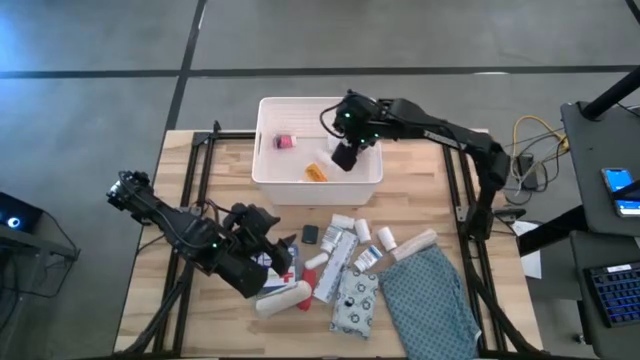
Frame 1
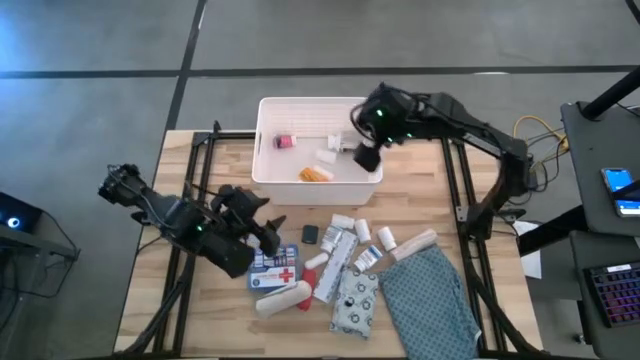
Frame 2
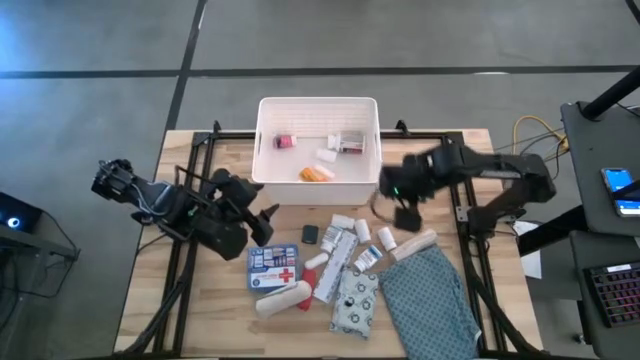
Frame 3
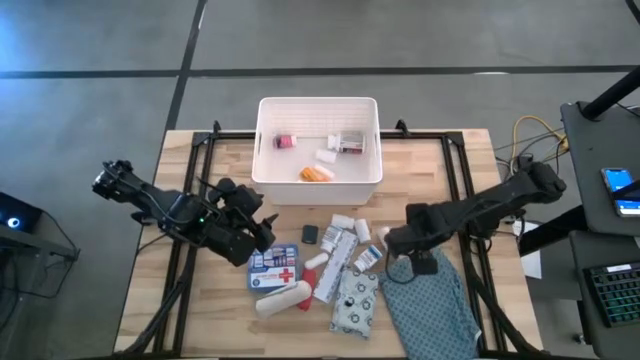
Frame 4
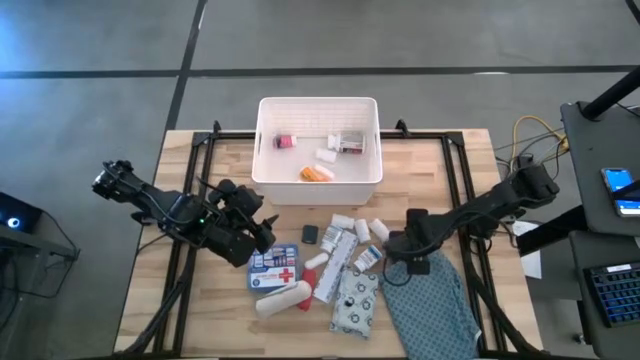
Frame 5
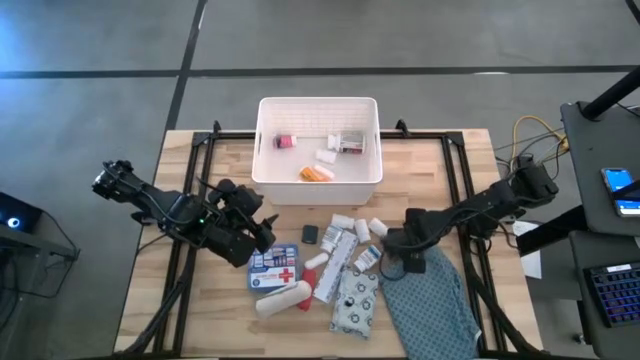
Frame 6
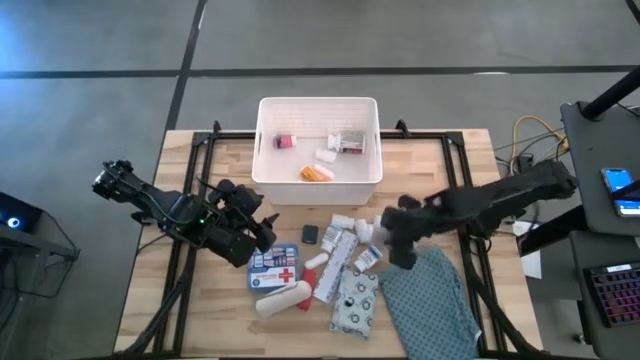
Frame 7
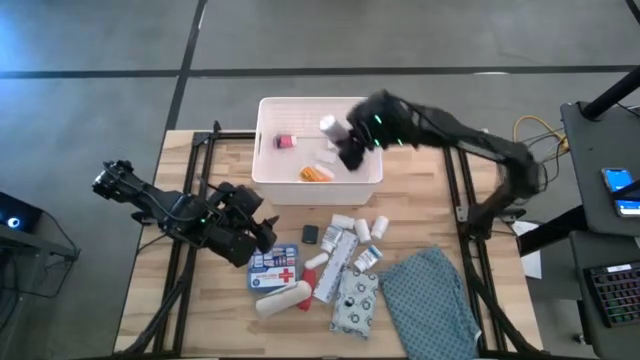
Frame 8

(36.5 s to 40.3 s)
Task: Pick & place medical supplies in basket/bin
Put the white bandage into the white bin

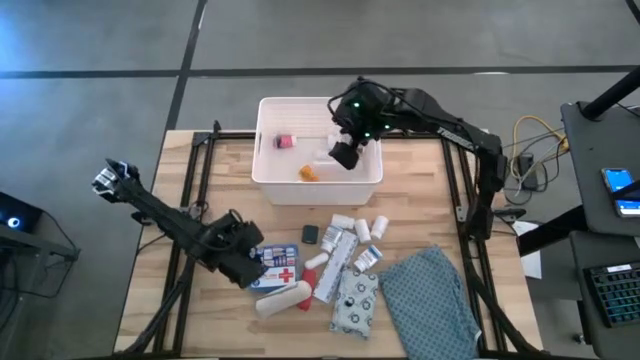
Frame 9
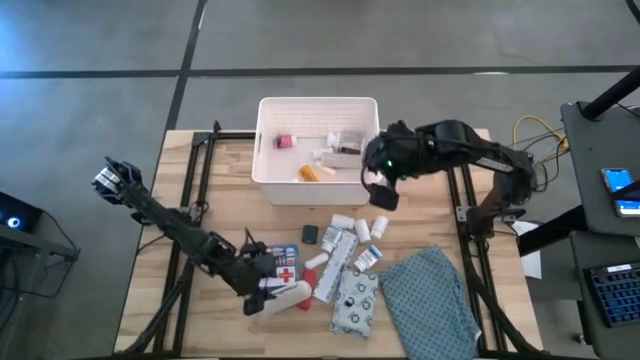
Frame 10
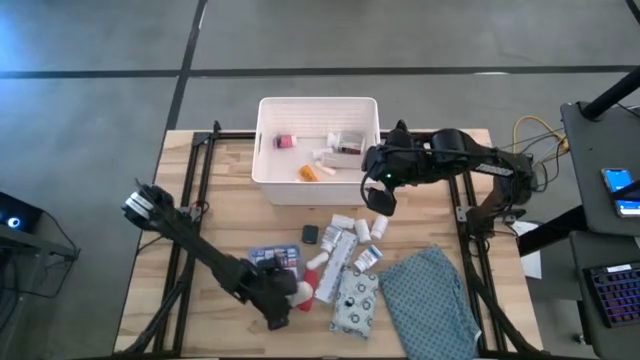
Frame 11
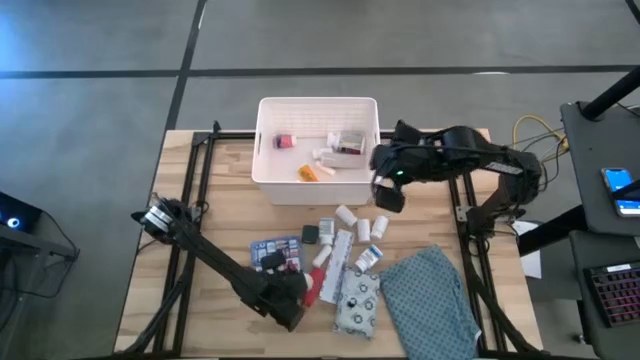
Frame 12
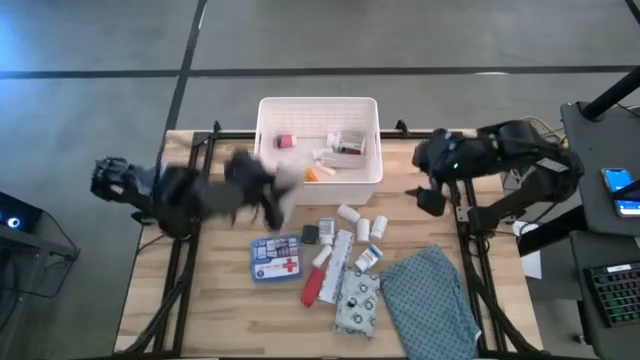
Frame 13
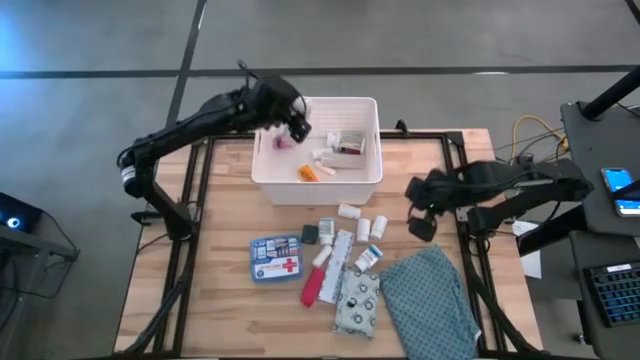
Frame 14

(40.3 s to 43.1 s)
Put the white bandage into the white bin

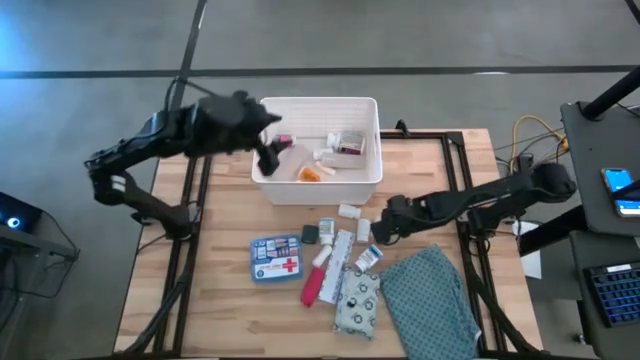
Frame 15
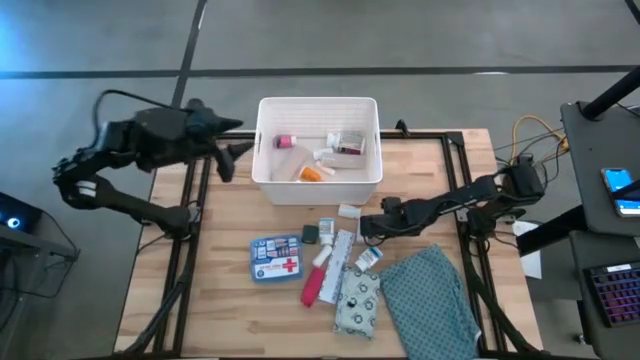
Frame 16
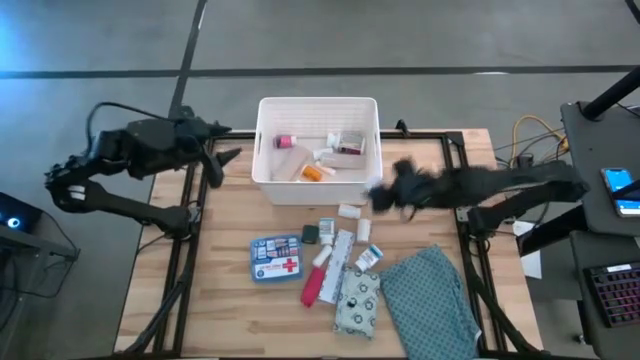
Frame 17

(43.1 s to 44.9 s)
Put the white bottle into the white bin

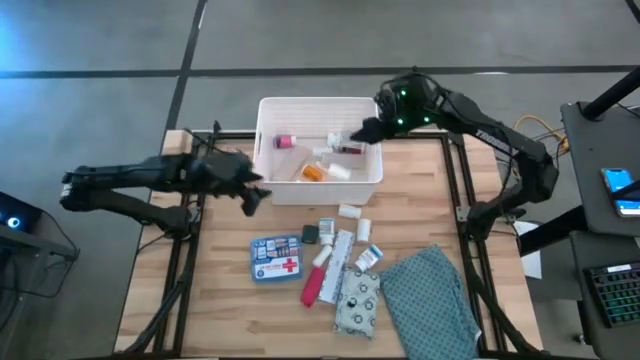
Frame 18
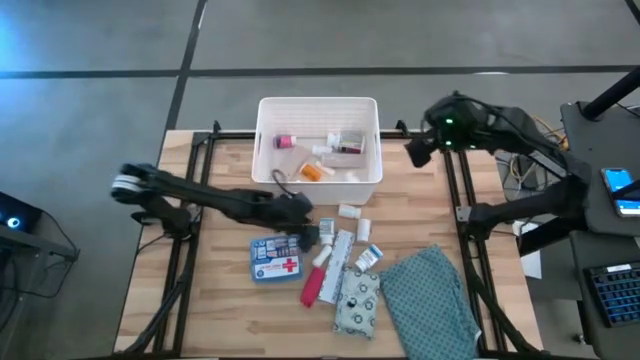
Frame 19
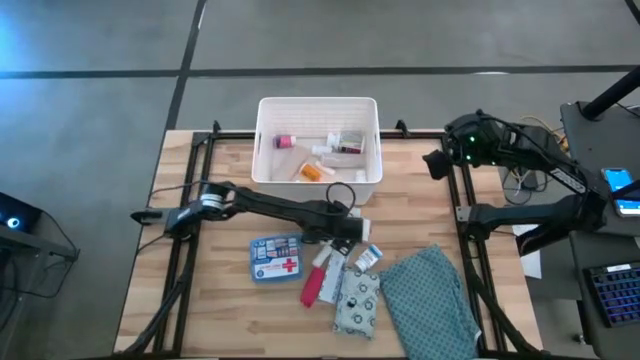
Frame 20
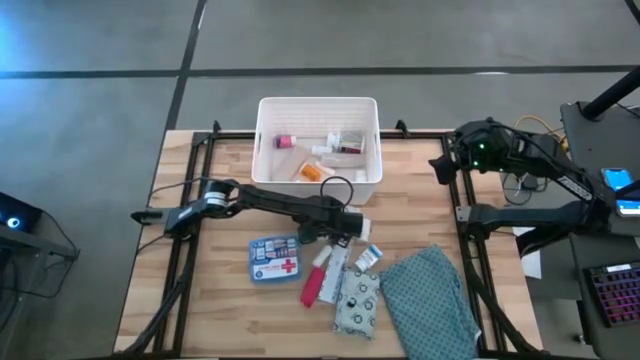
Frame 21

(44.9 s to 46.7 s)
Put the white and blue bottle into the white bin

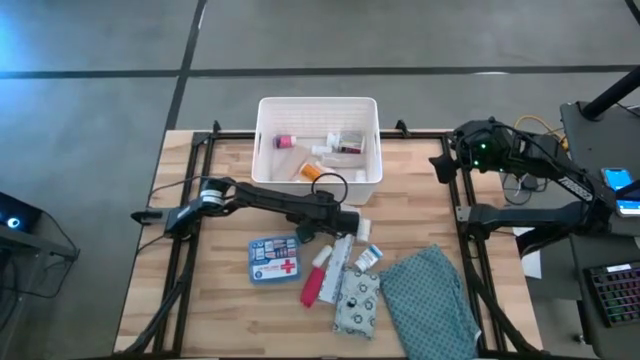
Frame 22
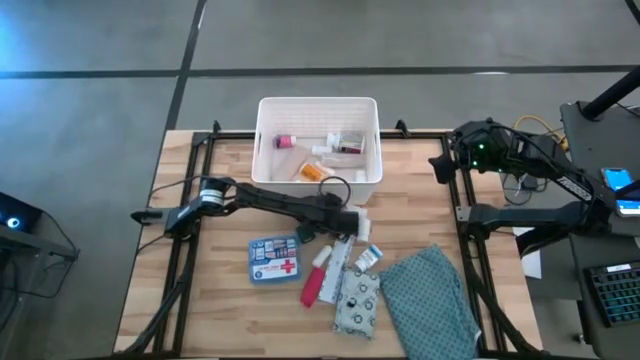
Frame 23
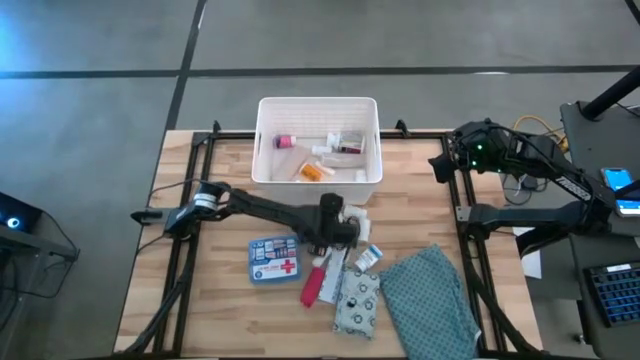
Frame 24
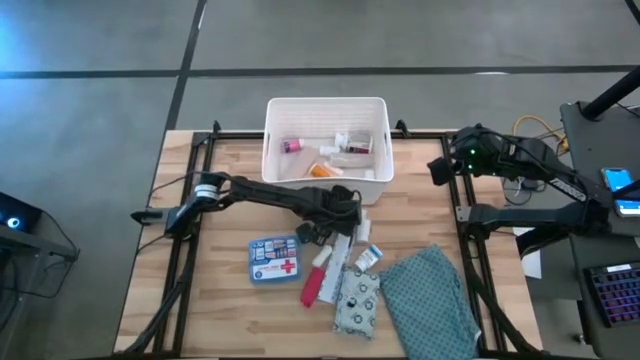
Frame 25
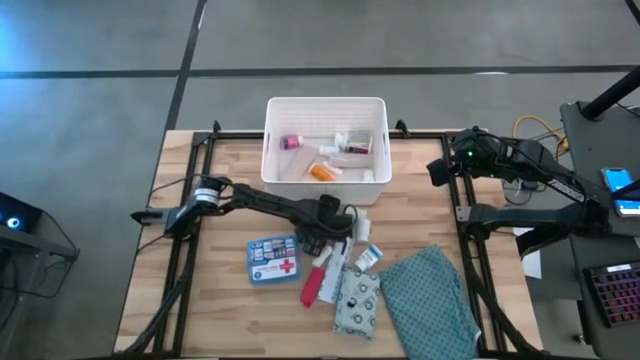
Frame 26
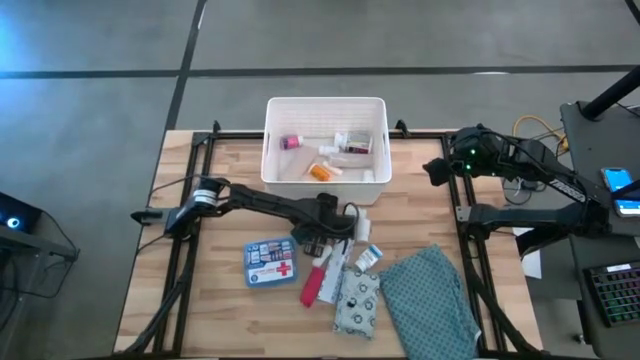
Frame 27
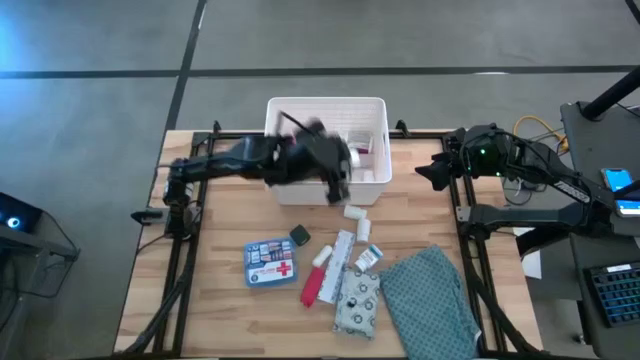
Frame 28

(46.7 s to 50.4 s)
Put the white and blue bottle into the white bin

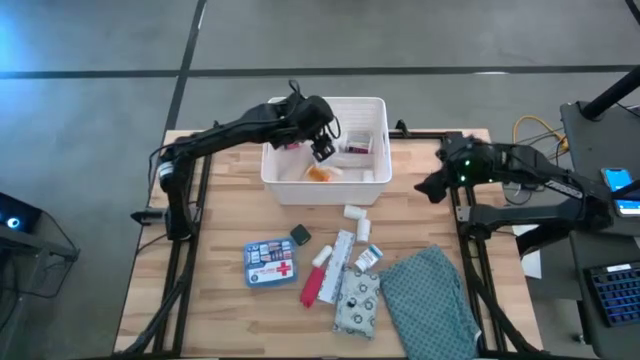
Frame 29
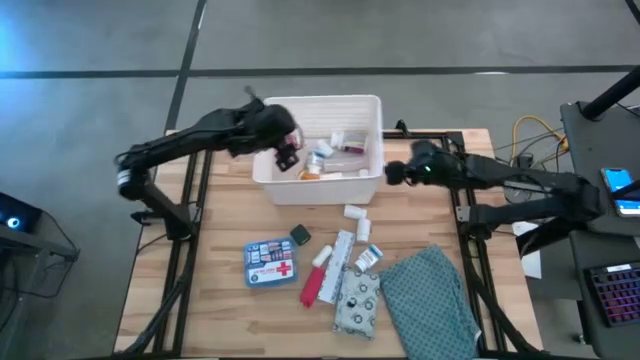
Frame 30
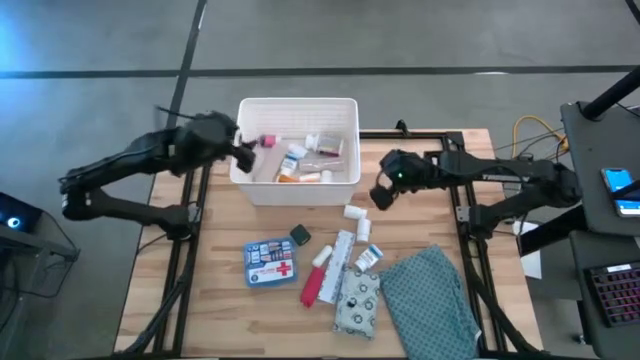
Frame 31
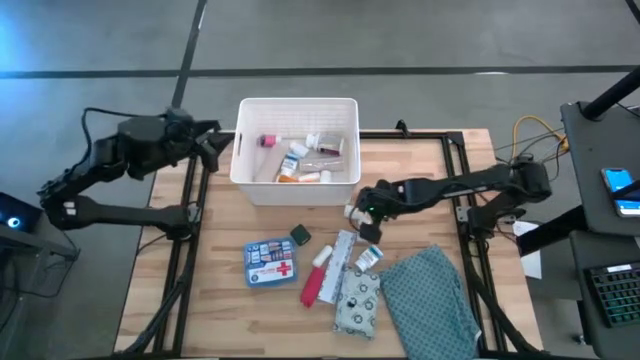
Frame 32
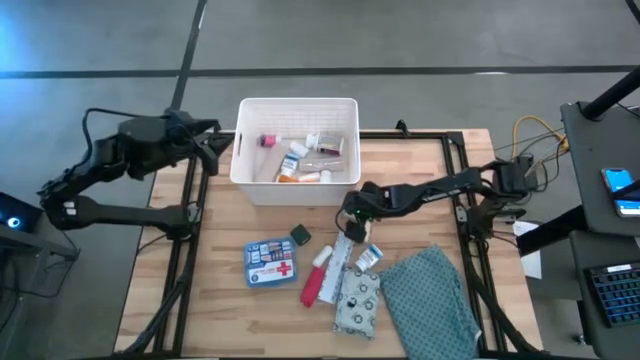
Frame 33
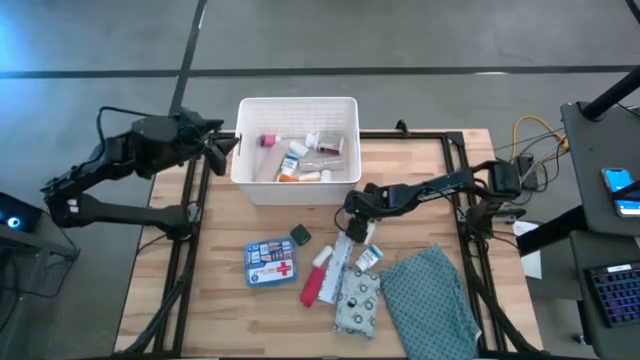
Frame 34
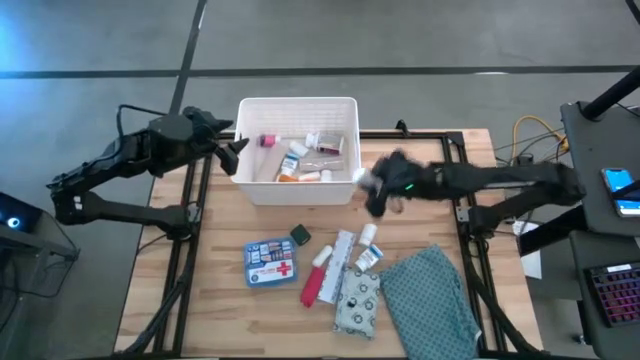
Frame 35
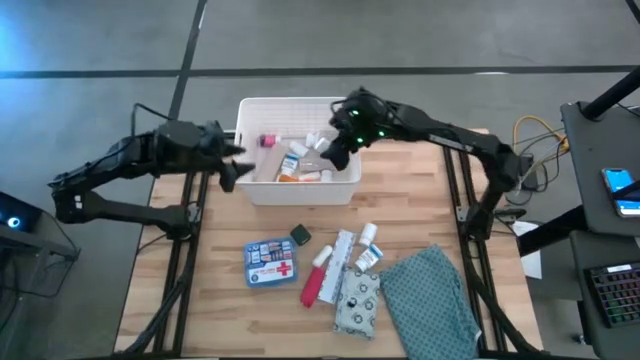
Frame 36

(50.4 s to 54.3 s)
Put the white bottle into the white bin

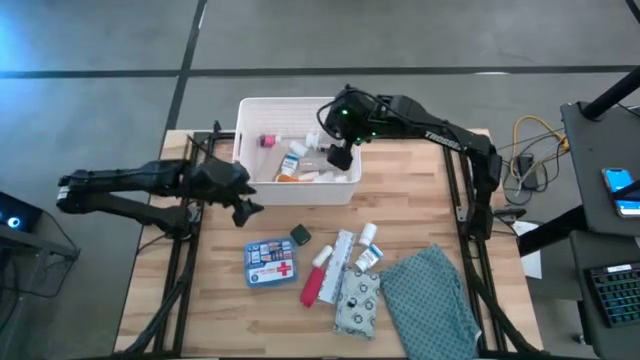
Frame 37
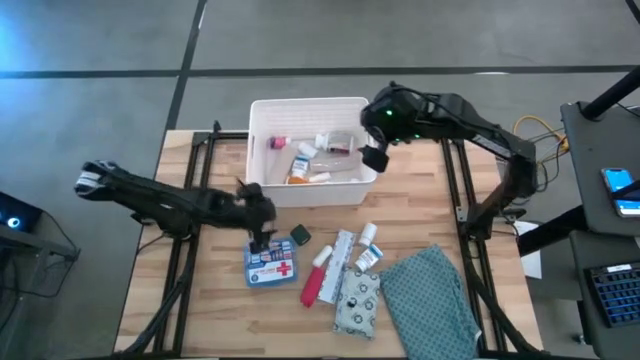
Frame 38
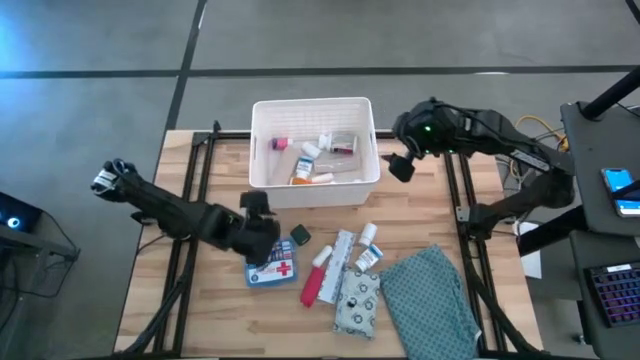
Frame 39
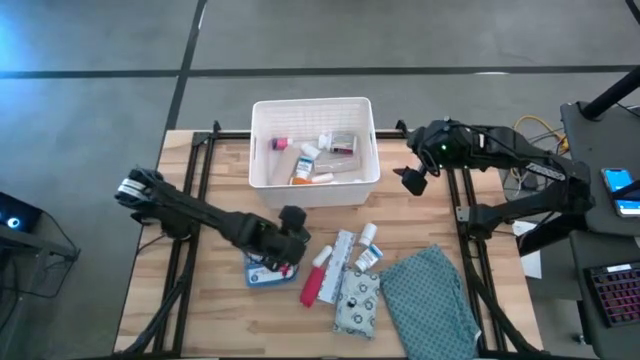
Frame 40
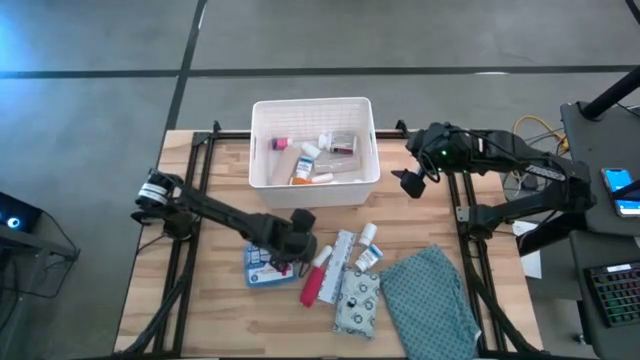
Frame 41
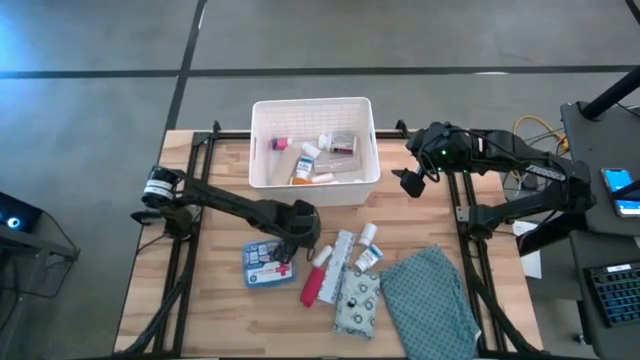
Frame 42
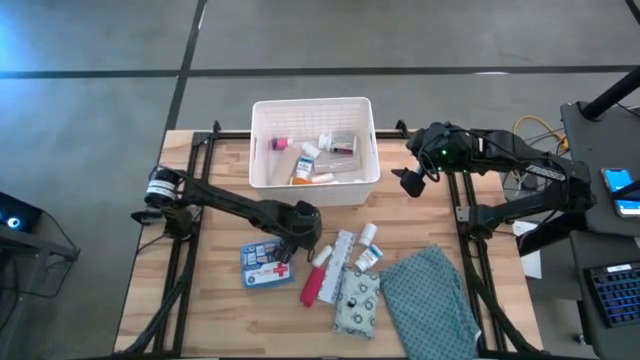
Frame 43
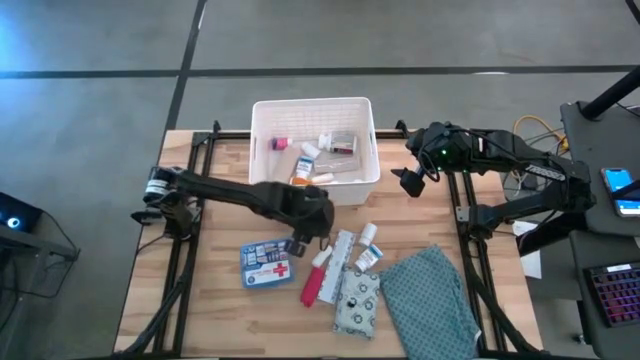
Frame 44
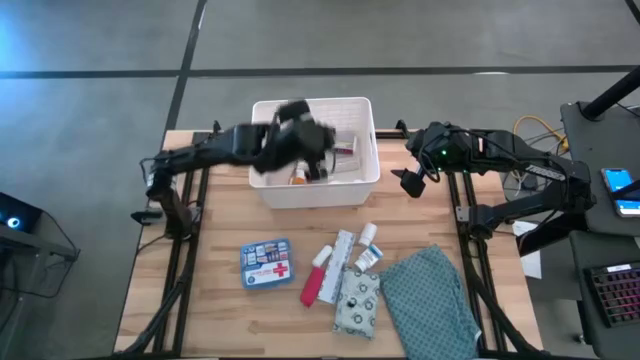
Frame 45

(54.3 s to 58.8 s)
Put the dark green bandage into the white bin
